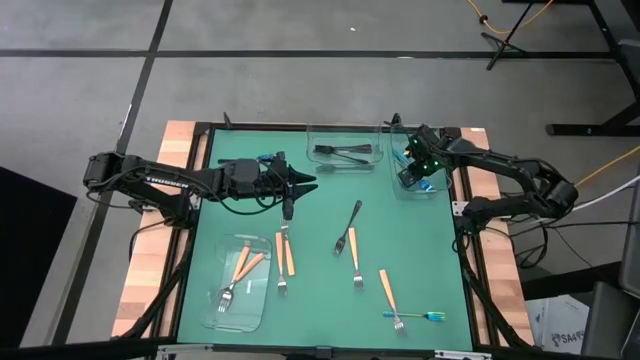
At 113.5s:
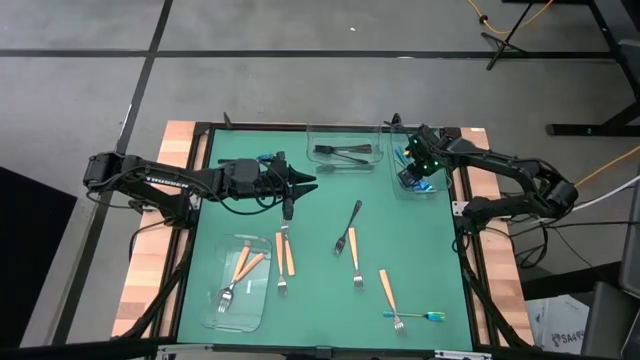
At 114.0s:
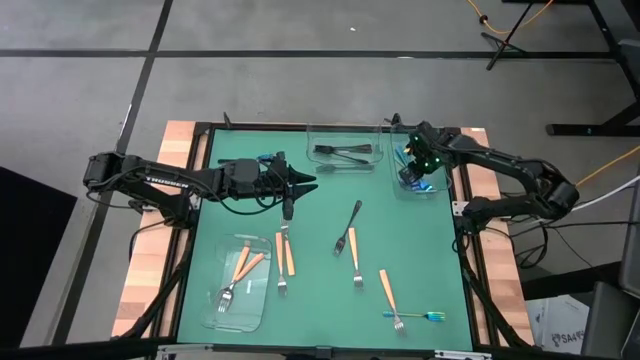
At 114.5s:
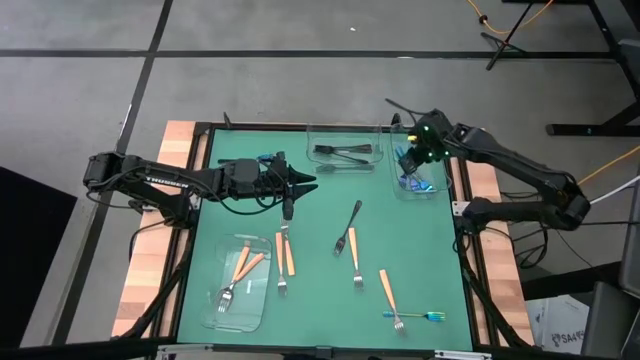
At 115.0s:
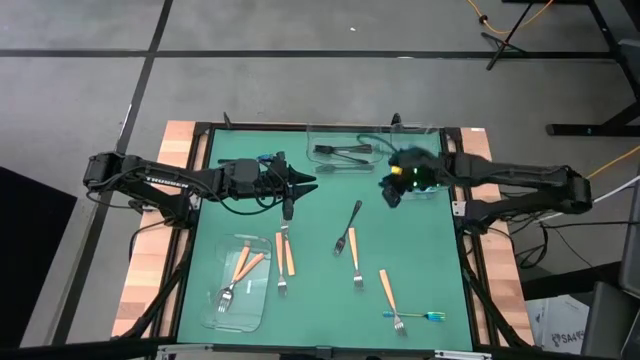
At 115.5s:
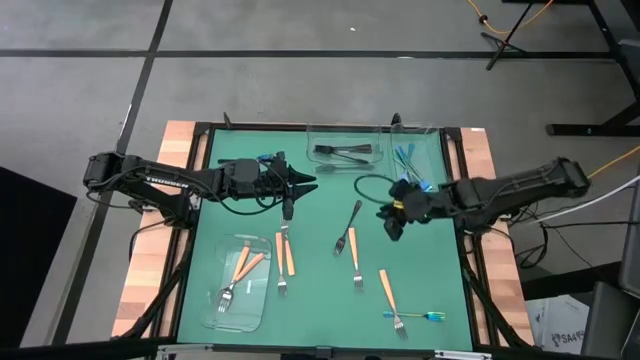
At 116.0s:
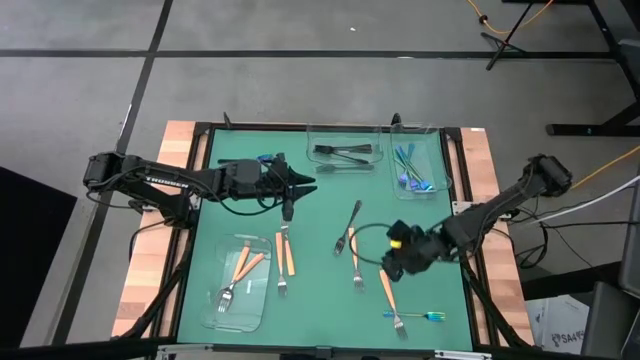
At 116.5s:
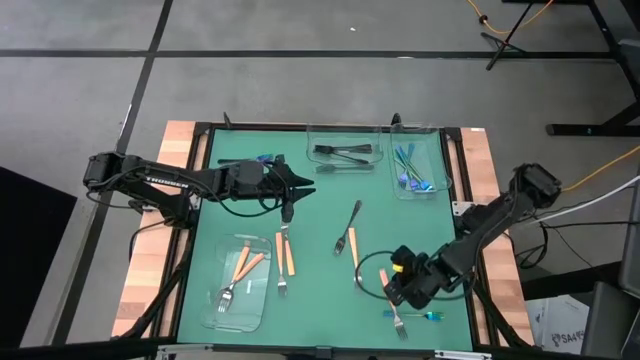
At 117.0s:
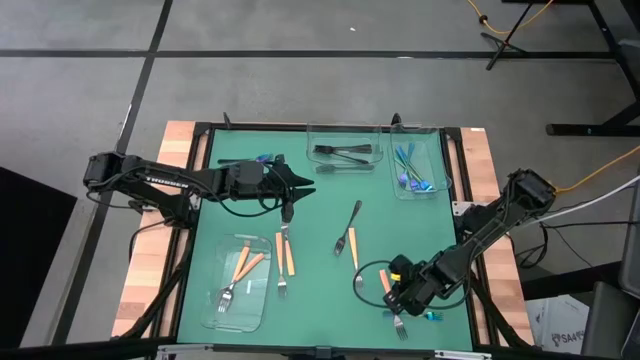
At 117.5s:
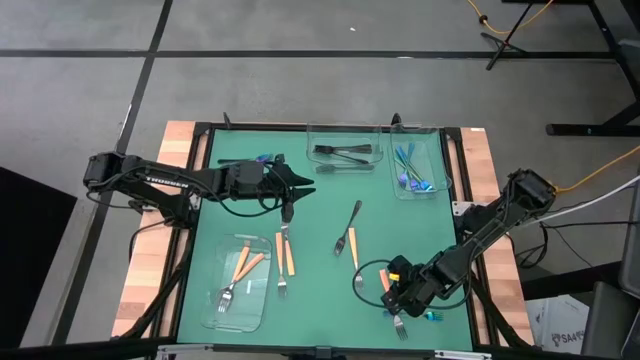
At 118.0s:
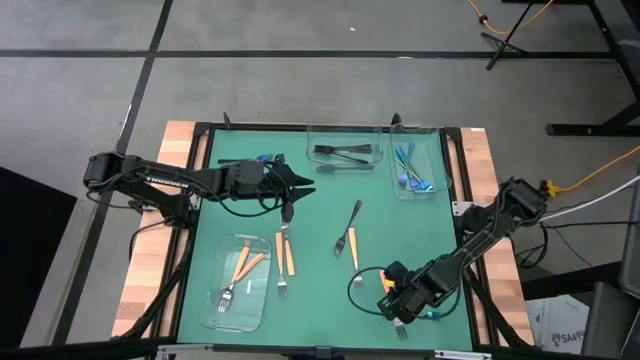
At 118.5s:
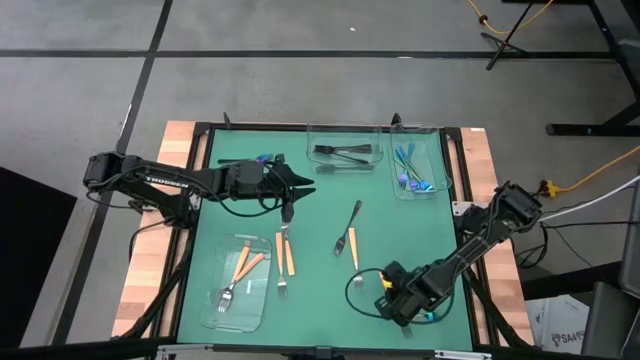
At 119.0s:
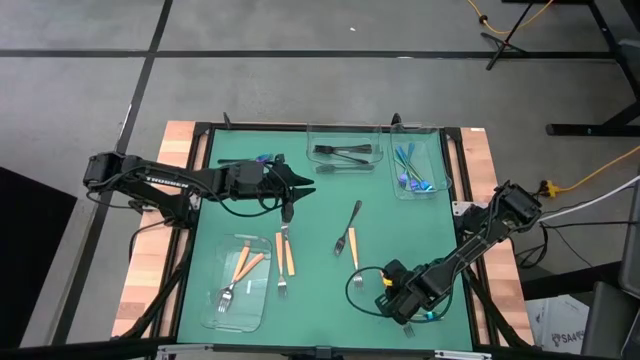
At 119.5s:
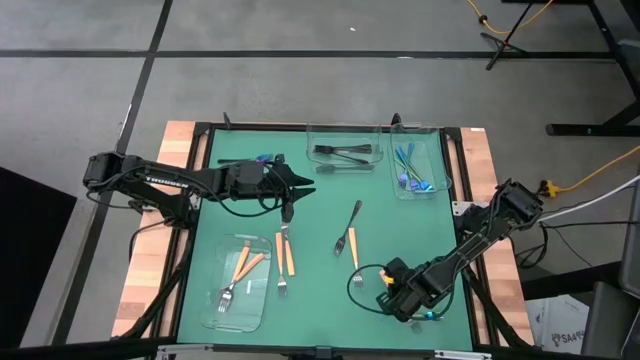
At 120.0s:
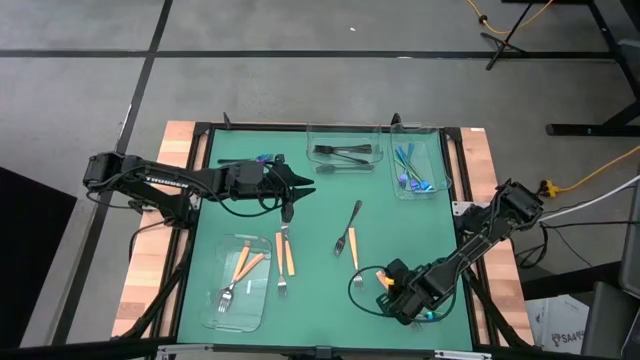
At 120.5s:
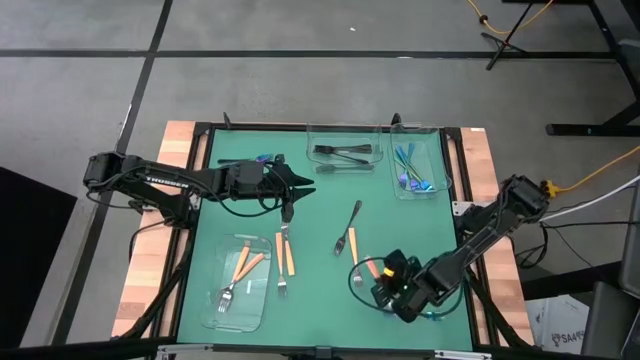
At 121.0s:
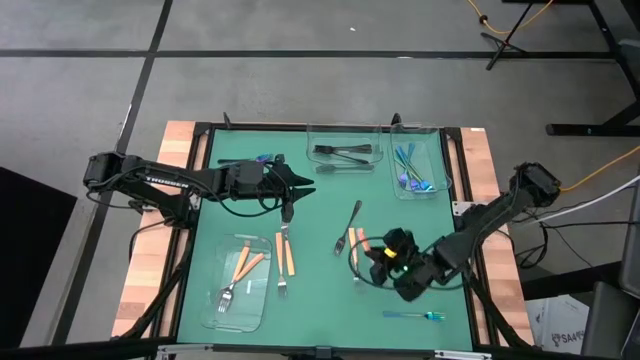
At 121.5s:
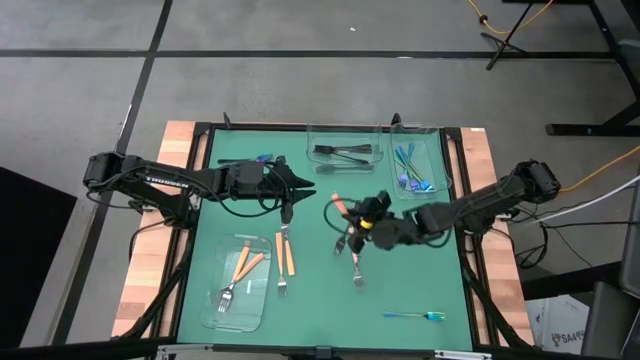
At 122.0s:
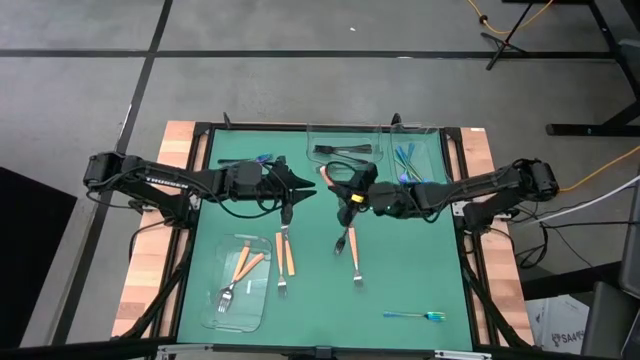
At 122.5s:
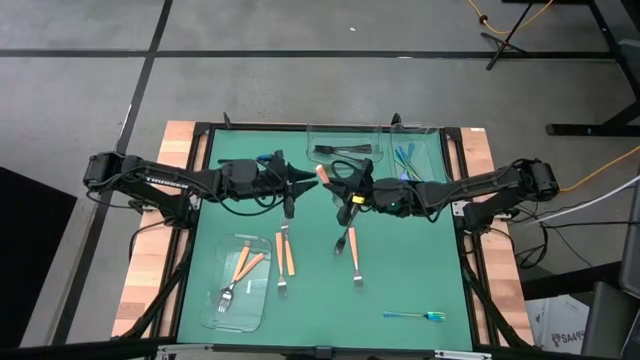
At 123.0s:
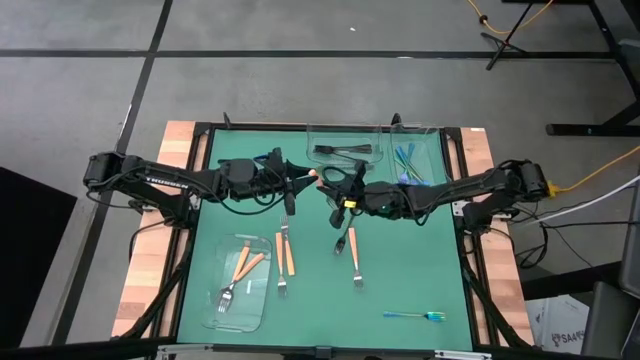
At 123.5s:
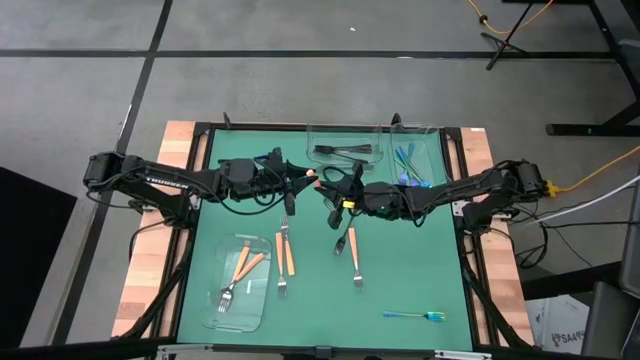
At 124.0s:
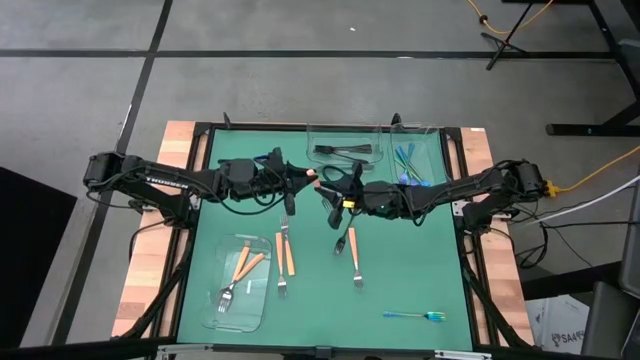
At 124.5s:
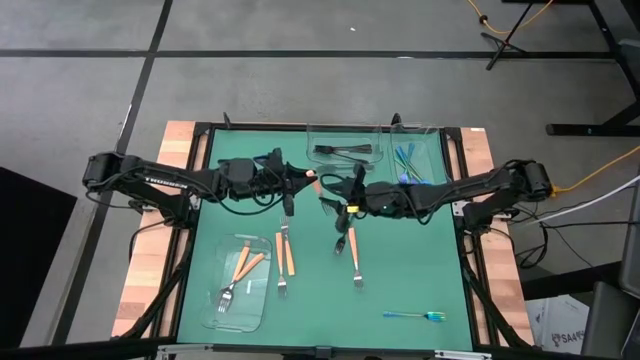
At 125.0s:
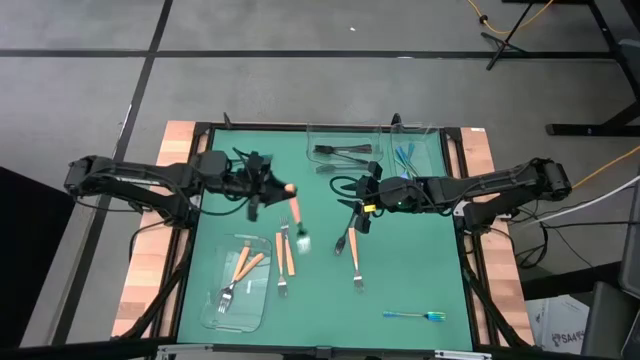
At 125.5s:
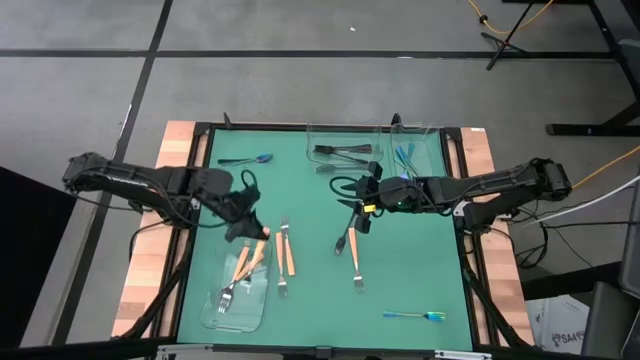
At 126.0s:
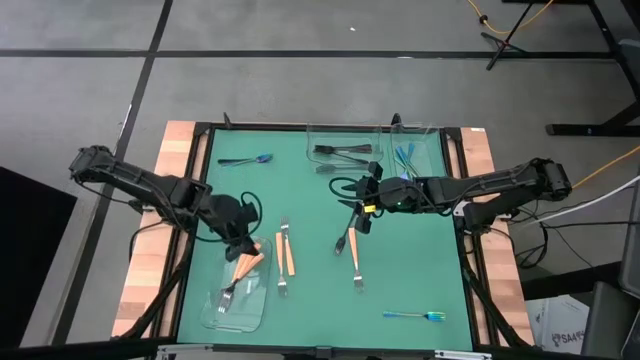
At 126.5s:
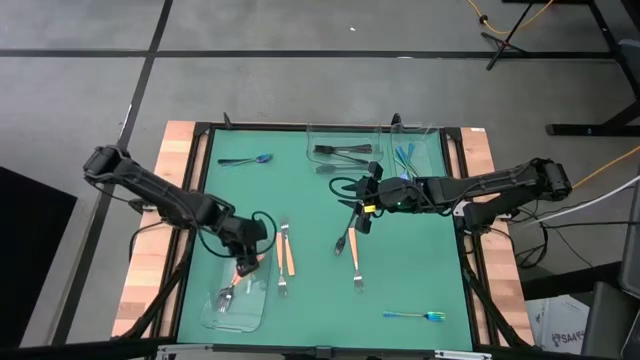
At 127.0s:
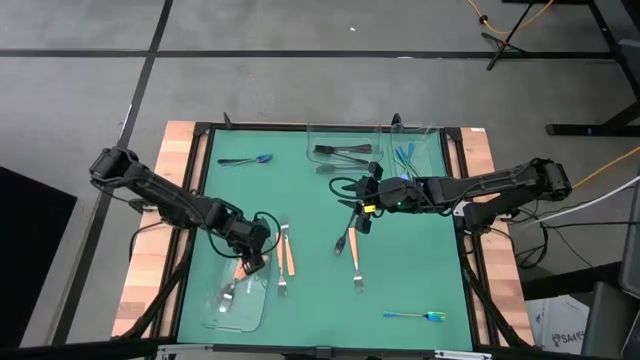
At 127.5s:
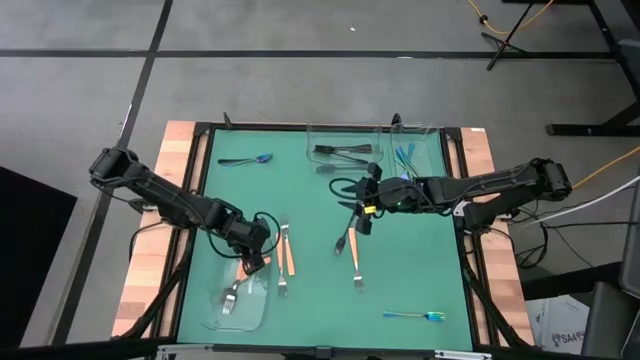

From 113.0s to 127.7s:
Task: Sort silverware by color (type)
Put the orange fork into the bottom transparent bin

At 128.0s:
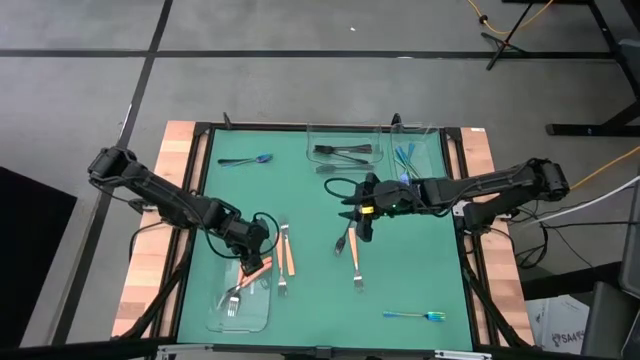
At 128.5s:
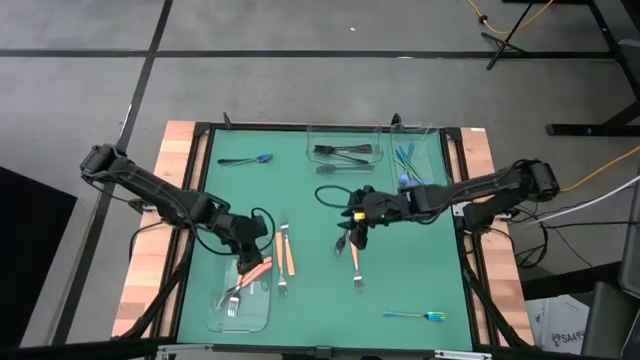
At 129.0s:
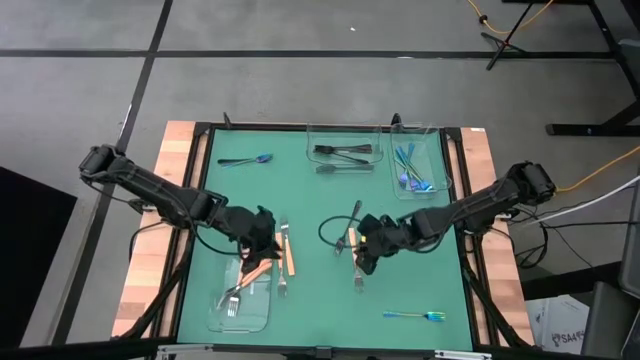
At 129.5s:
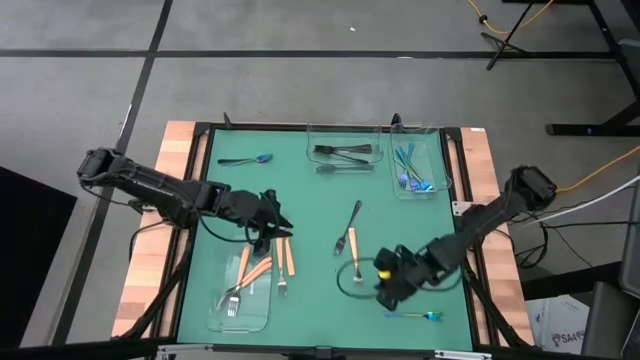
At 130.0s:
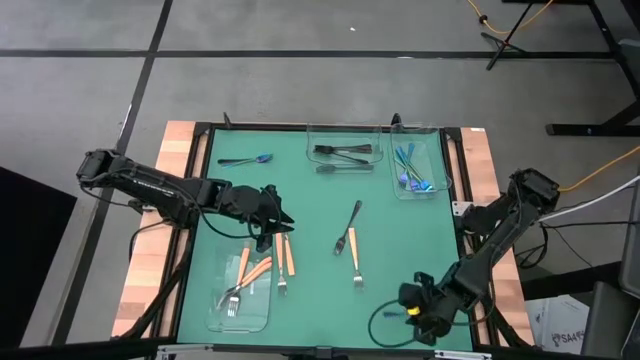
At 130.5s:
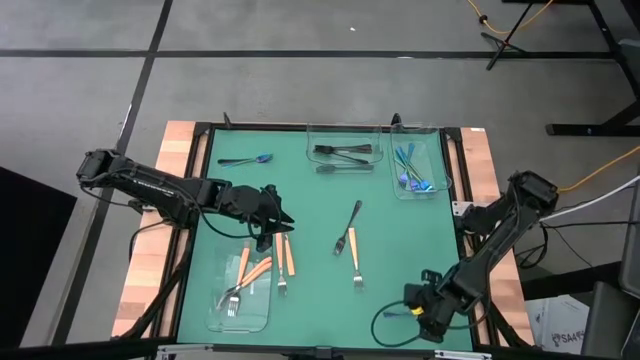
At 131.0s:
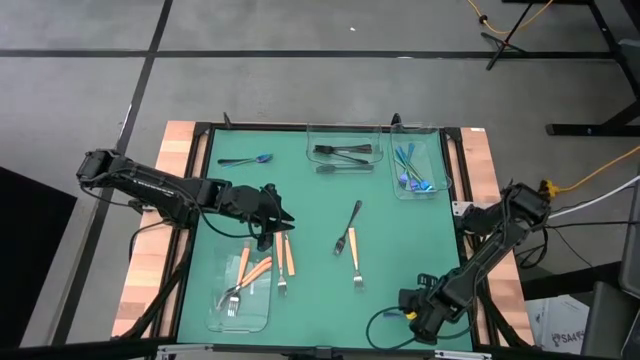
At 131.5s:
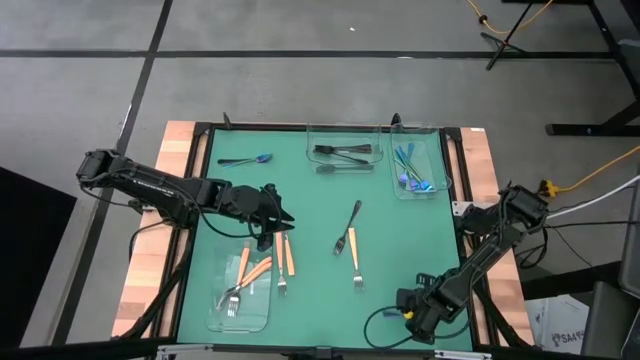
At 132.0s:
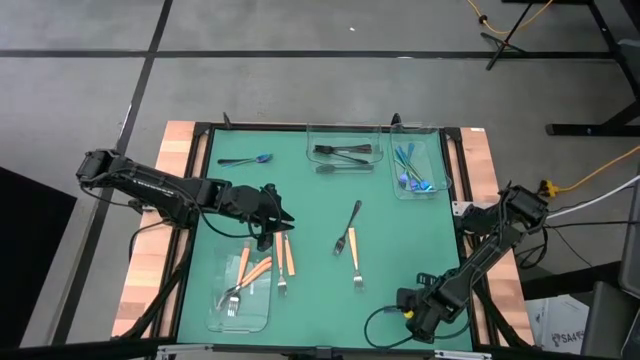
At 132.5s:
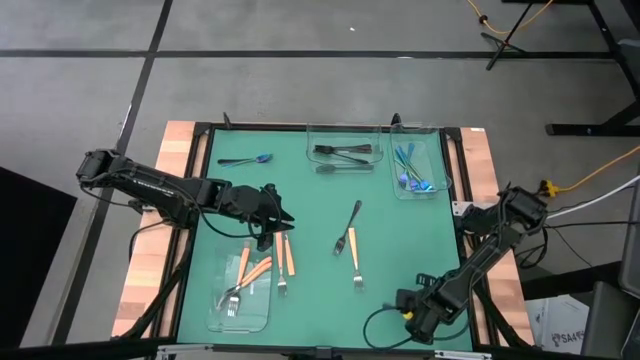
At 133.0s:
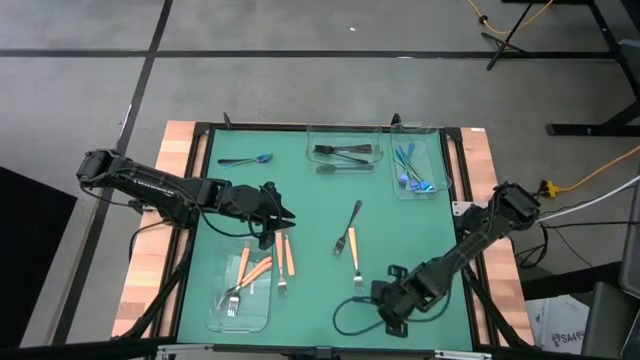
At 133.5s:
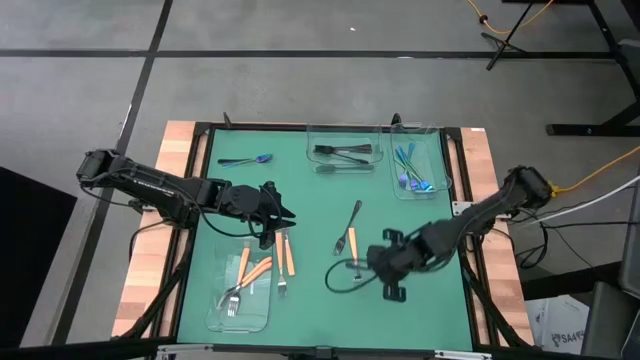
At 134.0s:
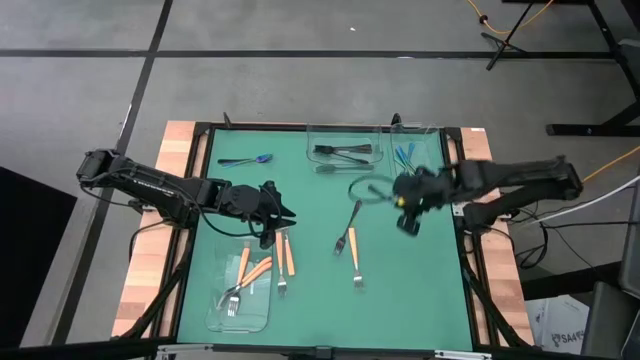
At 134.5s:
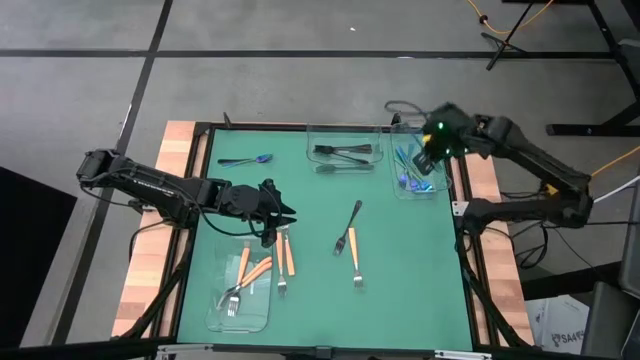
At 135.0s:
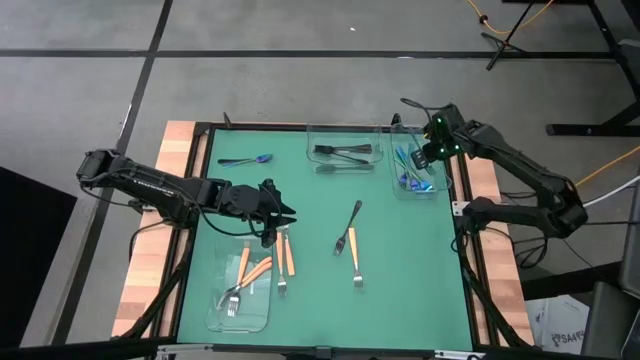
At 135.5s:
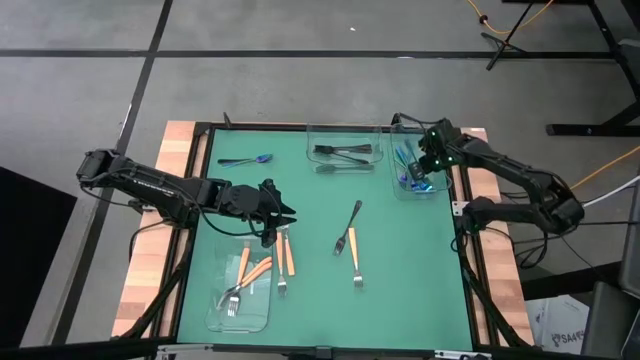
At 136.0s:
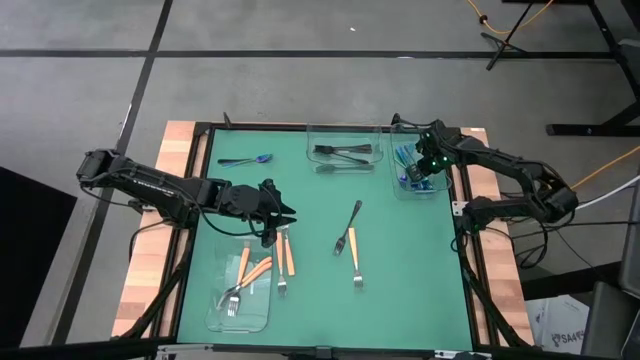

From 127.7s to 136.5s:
Put the blue fork into the top right transparent bin
